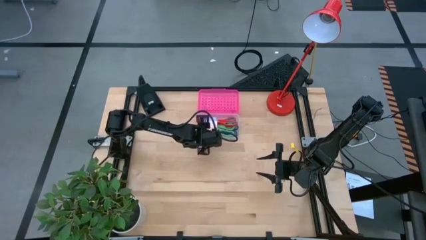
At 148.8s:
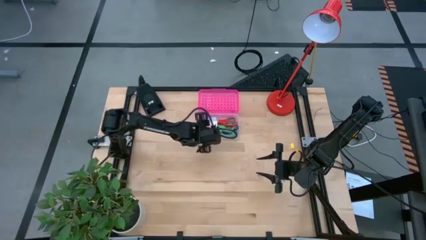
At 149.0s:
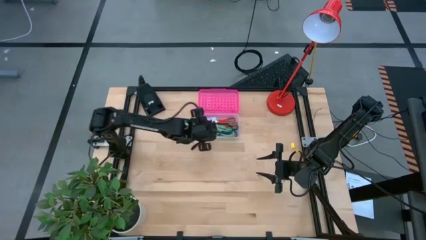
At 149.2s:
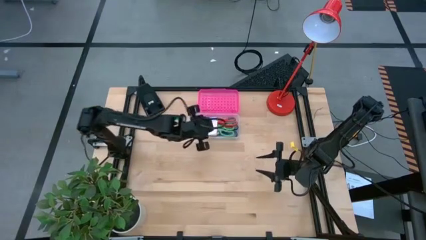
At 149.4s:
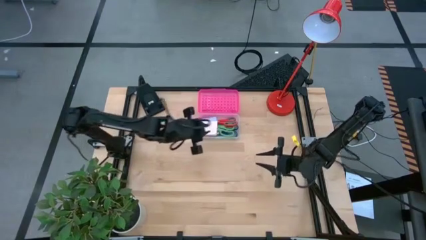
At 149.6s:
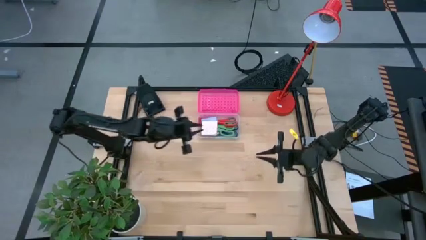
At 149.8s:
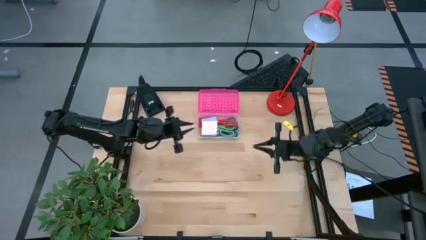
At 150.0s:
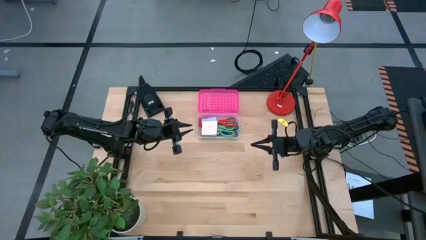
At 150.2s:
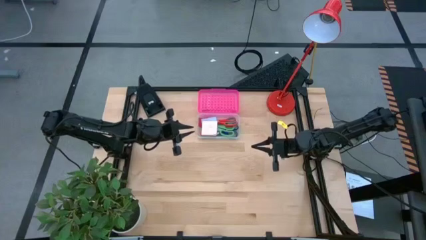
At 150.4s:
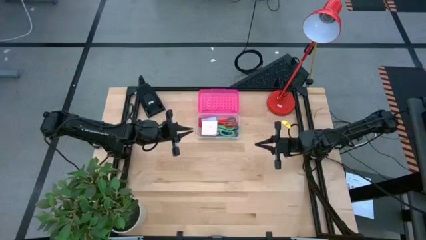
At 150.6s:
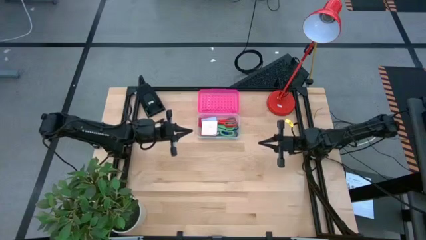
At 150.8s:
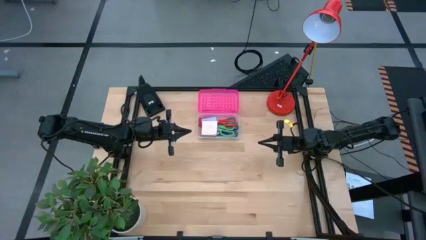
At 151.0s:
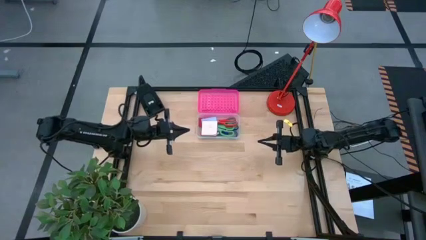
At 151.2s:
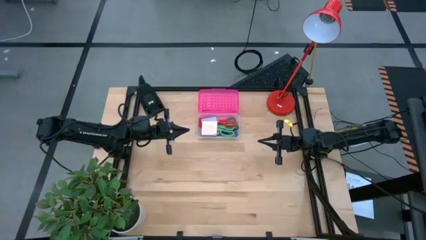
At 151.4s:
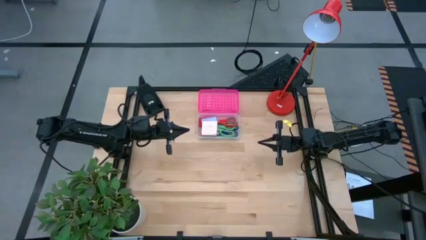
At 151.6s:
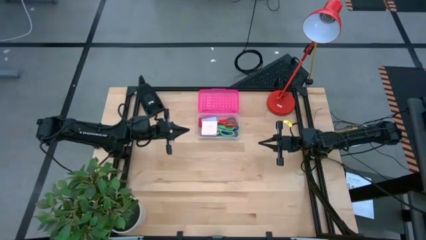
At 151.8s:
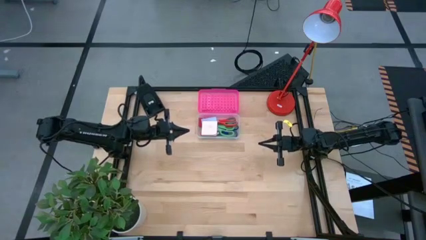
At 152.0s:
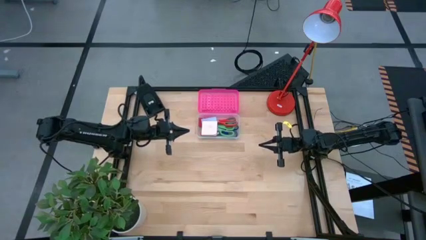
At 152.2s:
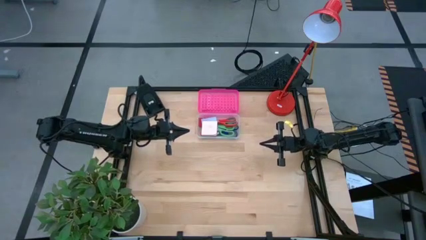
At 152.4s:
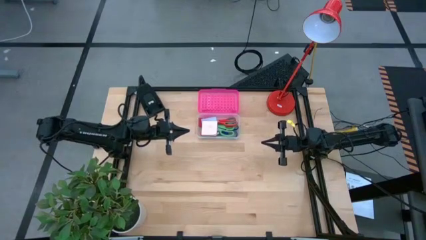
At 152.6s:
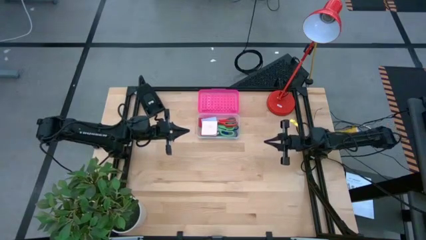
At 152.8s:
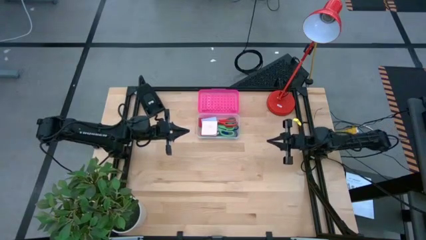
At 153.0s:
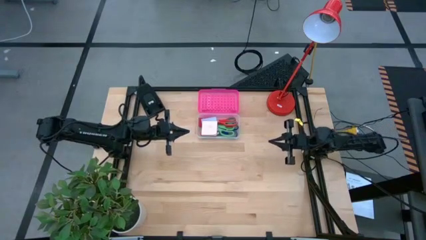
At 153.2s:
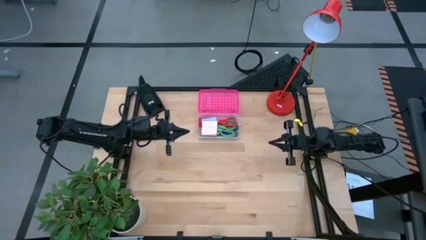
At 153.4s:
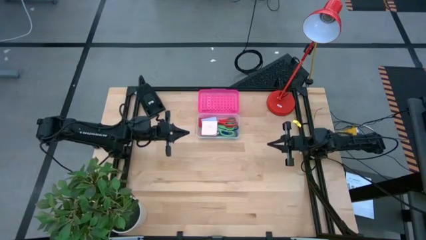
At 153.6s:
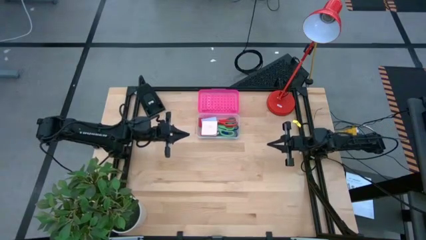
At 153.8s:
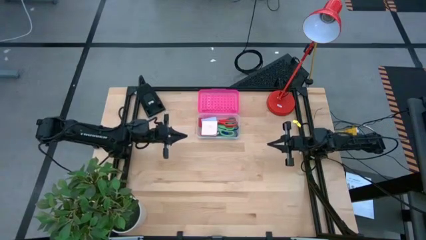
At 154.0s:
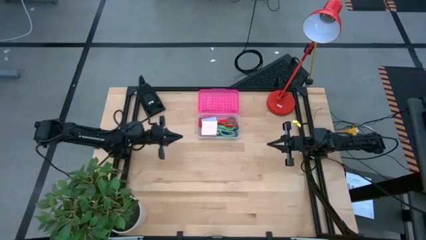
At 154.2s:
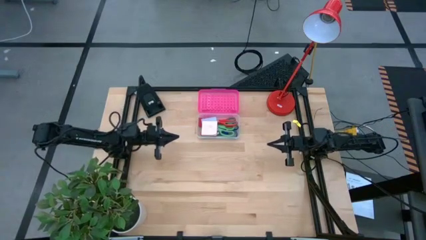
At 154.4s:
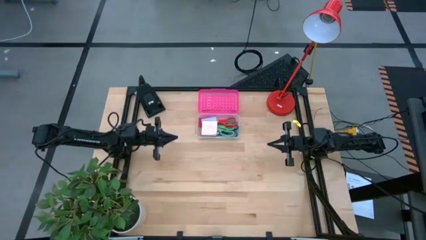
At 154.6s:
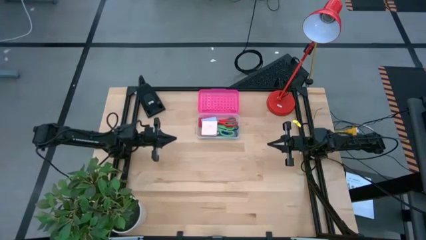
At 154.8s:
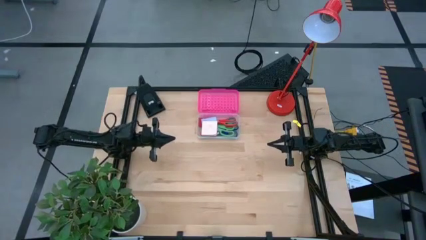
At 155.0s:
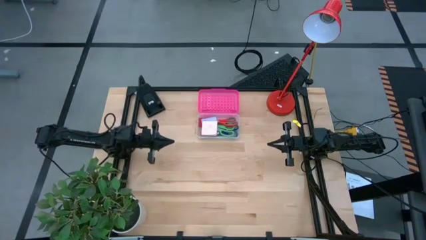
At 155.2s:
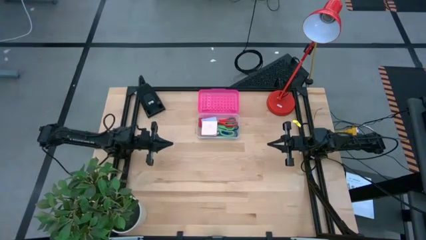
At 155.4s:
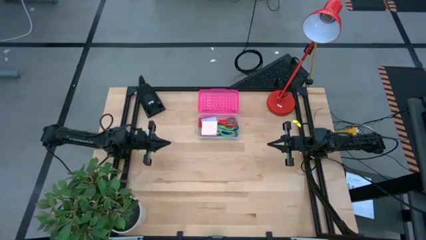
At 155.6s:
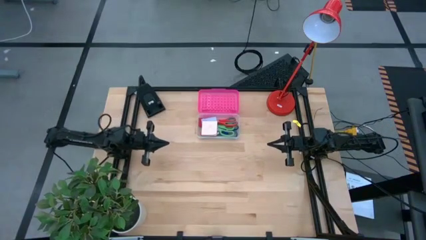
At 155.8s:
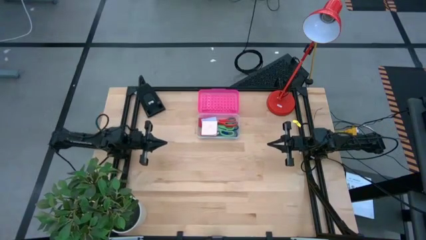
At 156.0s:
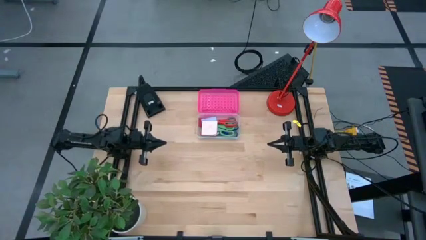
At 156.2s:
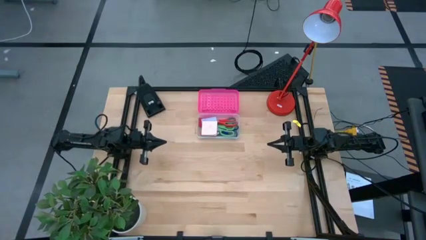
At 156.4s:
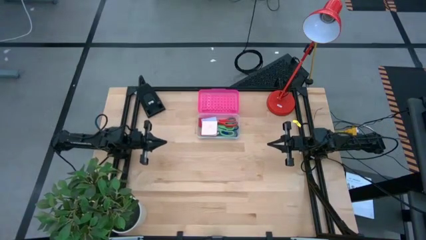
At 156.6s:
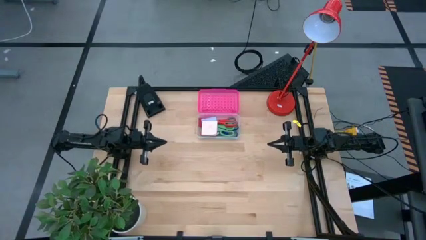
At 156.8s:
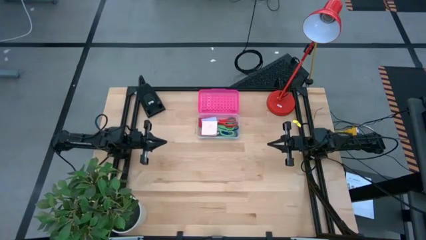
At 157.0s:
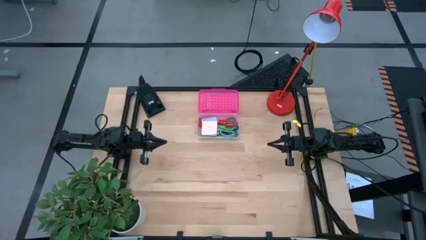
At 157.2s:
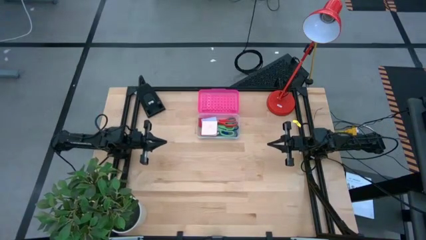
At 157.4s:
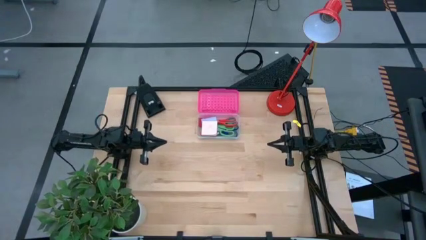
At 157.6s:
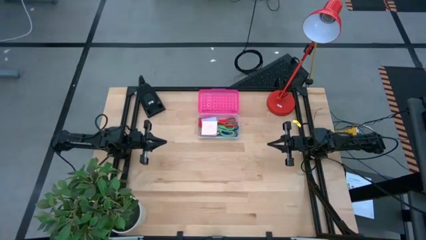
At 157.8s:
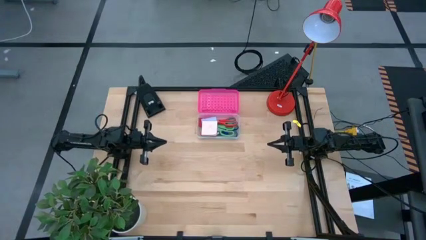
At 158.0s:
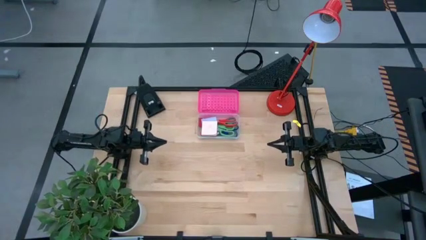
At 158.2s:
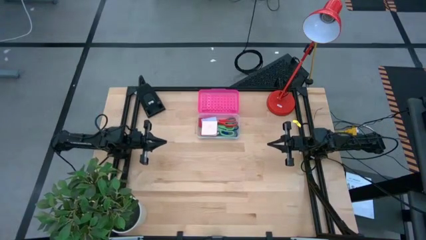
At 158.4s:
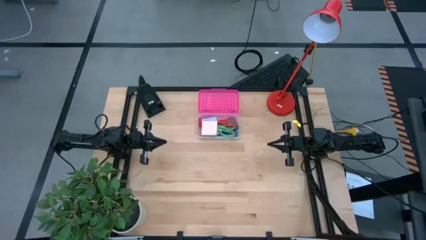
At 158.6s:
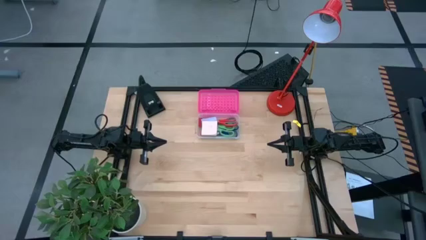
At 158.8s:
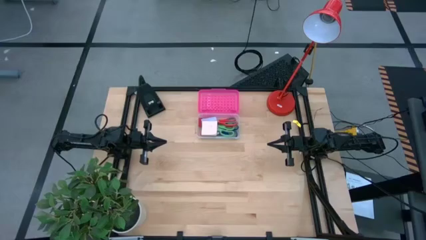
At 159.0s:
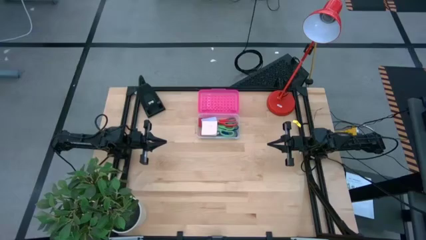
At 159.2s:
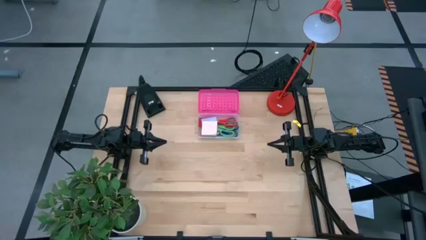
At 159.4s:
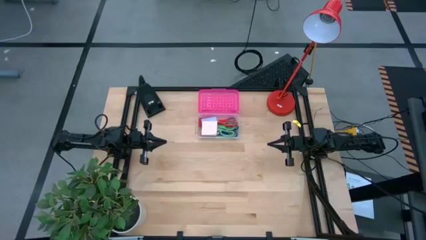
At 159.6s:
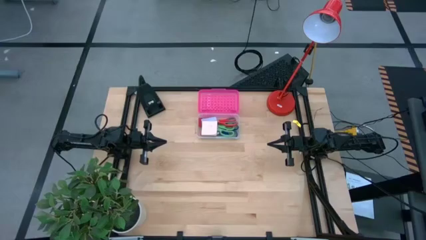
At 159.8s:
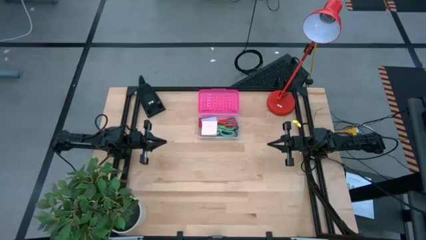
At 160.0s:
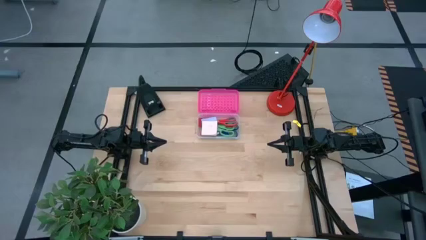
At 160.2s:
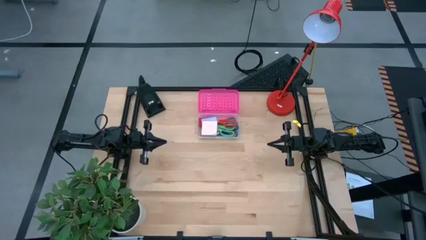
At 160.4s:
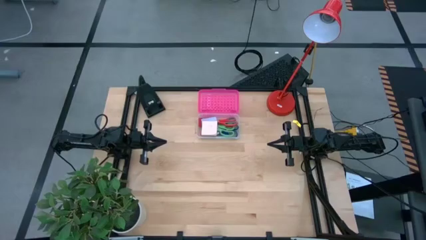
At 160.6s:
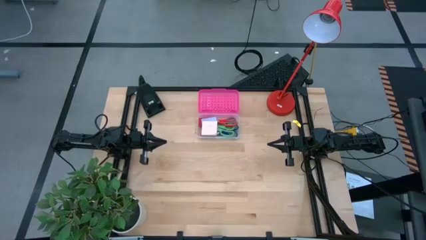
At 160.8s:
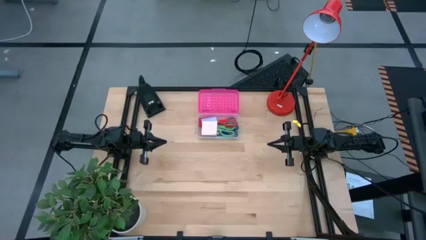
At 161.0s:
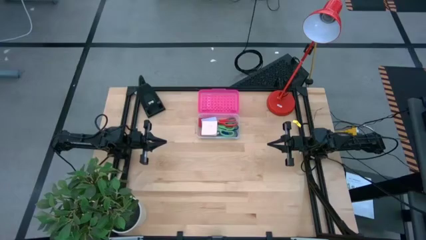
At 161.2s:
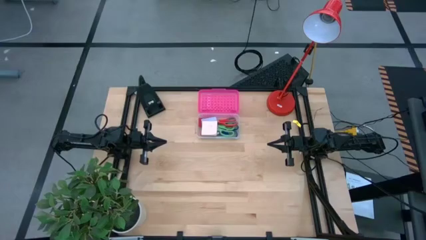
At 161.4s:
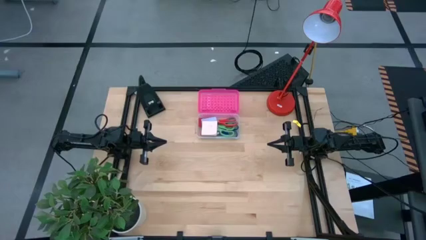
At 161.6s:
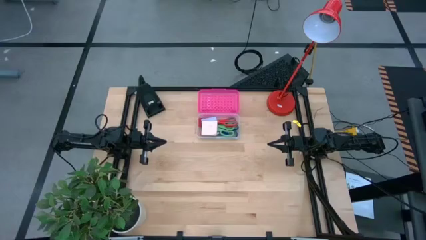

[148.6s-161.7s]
Task: Pack school essentials
Return to Home Position

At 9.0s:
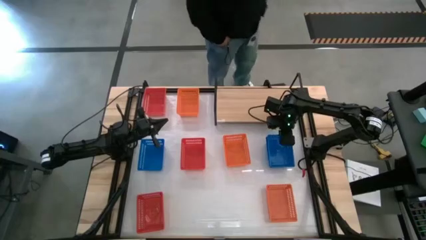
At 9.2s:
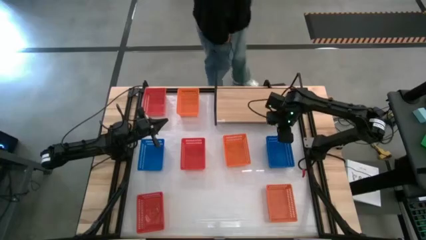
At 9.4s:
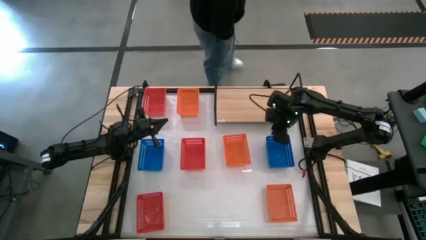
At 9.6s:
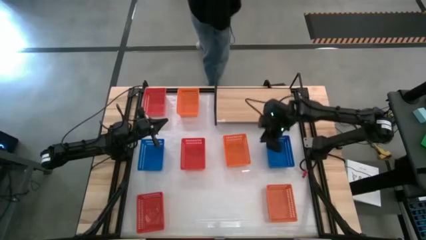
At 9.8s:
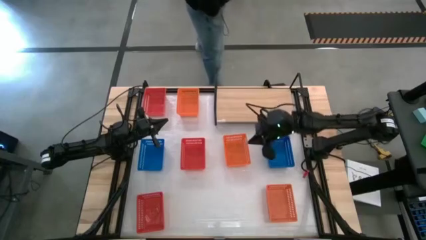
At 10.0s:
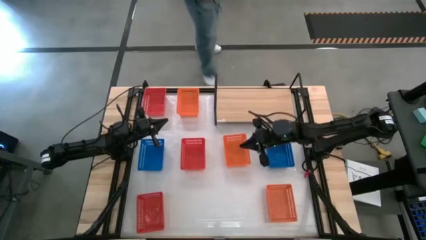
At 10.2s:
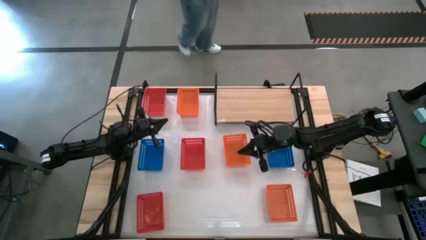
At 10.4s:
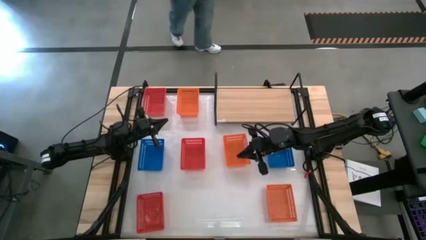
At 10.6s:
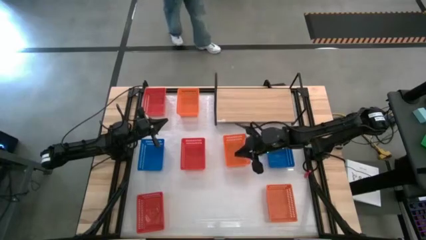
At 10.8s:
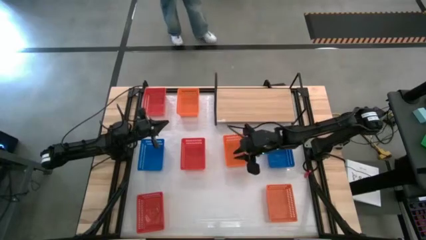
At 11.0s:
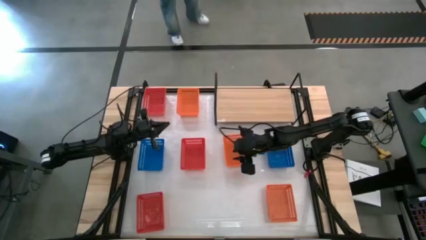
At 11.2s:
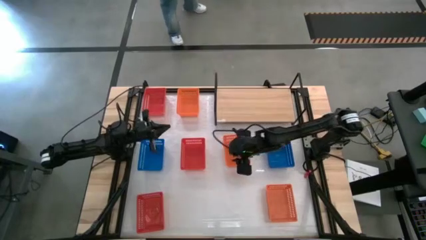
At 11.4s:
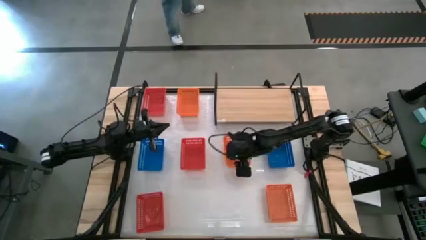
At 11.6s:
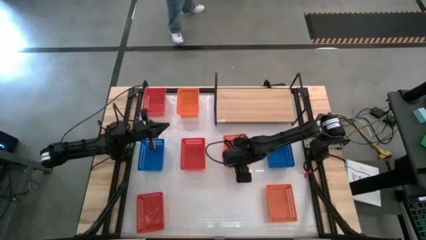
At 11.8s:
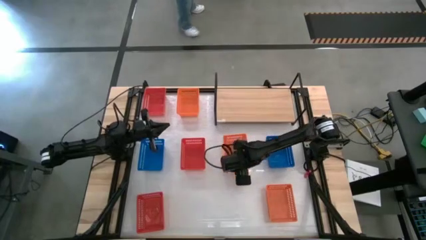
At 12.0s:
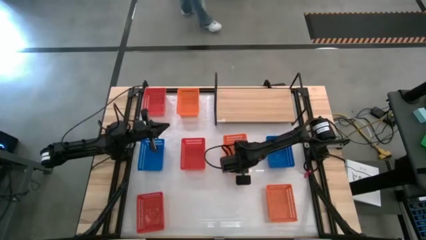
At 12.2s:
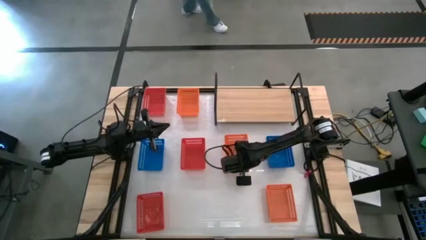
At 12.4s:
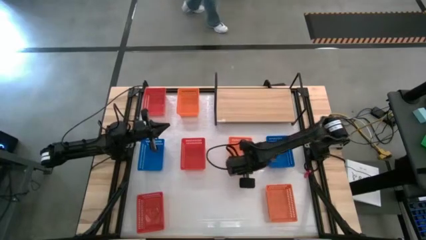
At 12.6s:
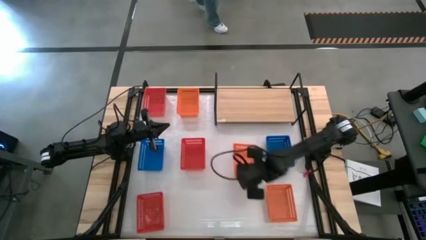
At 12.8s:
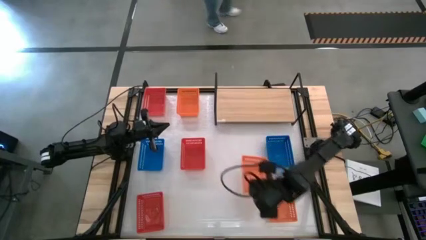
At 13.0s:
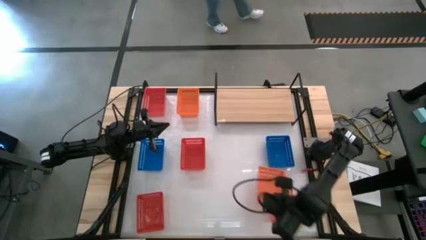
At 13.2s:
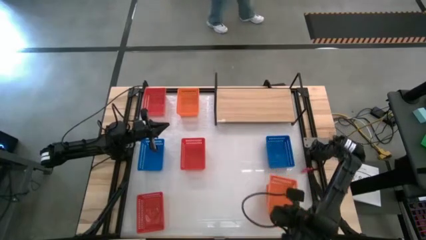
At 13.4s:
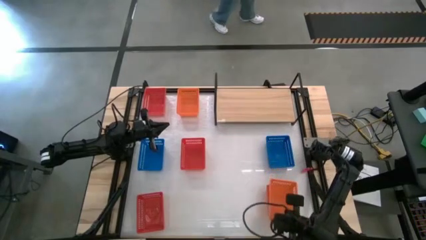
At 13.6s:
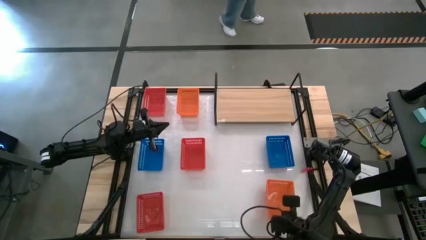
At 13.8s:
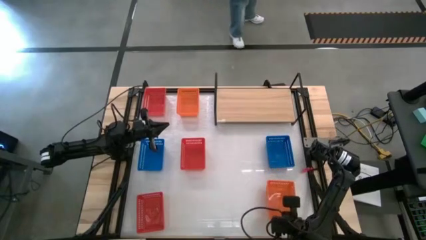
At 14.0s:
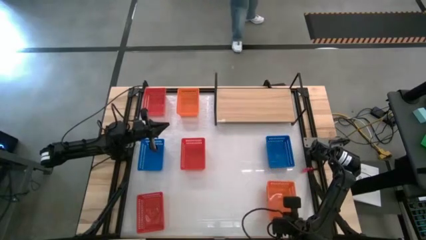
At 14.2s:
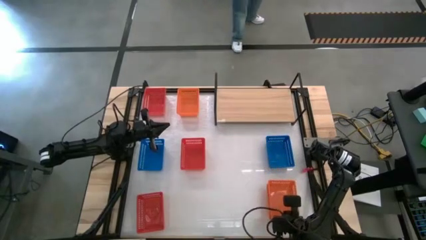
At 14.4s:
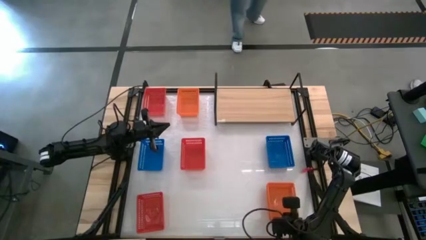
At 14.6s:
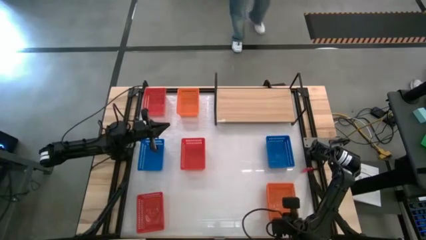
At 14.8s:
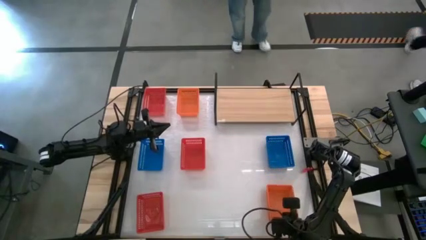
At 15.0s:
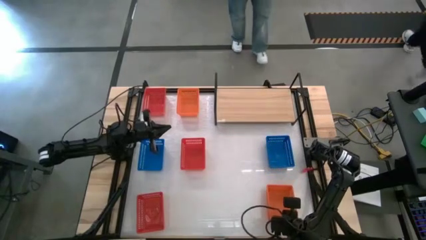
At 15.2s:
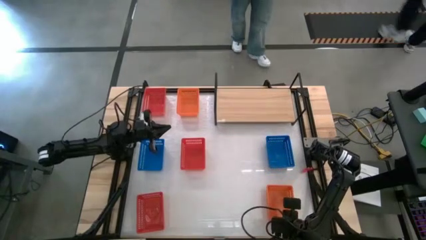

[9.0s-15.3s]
Task: Stack baskets on shelf by color
Stack the middle orange basket on top of the bottom orange basket
